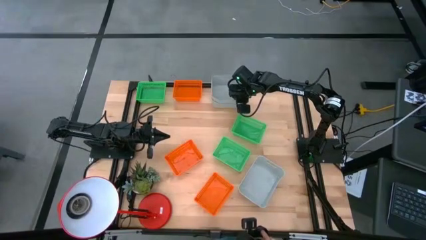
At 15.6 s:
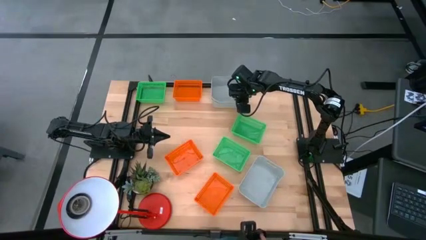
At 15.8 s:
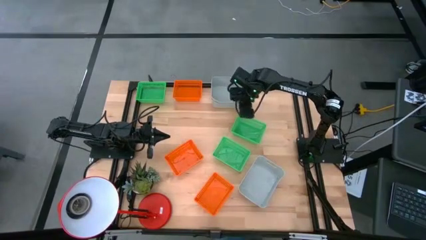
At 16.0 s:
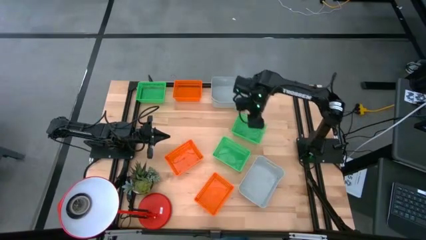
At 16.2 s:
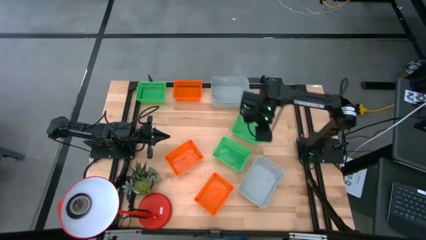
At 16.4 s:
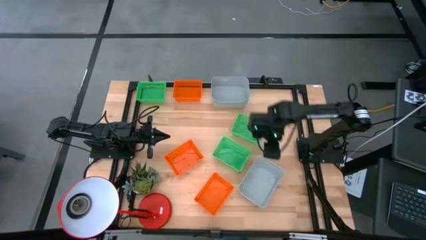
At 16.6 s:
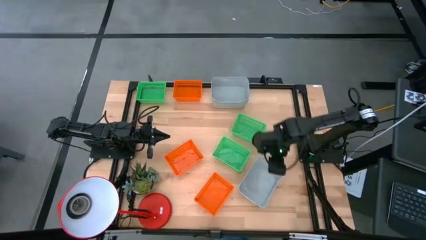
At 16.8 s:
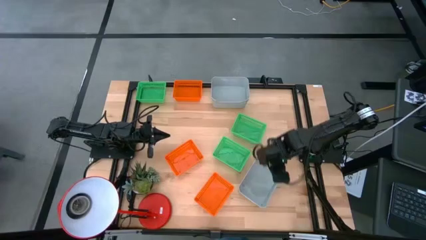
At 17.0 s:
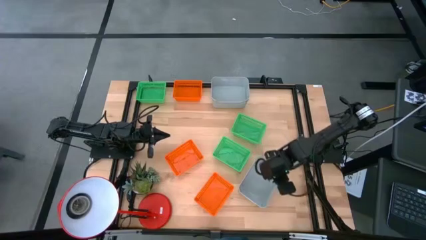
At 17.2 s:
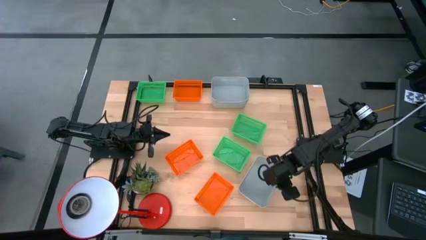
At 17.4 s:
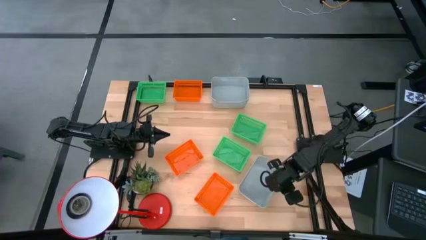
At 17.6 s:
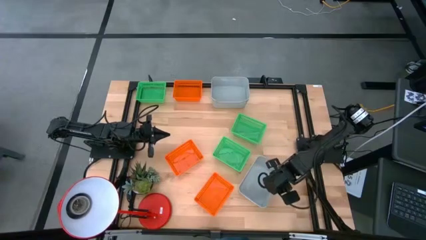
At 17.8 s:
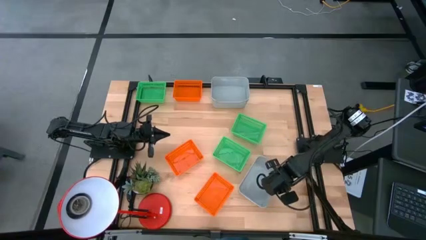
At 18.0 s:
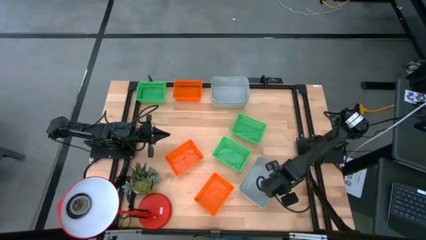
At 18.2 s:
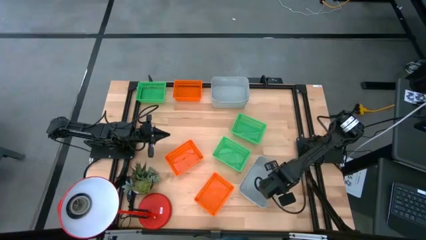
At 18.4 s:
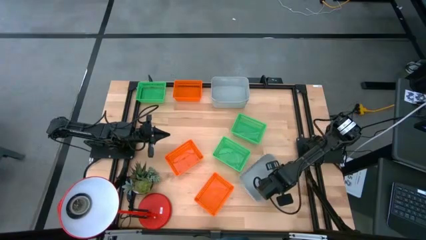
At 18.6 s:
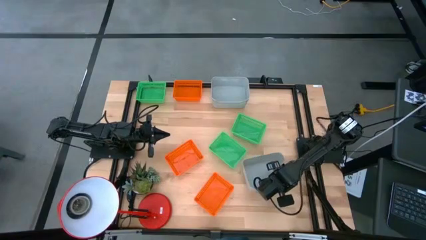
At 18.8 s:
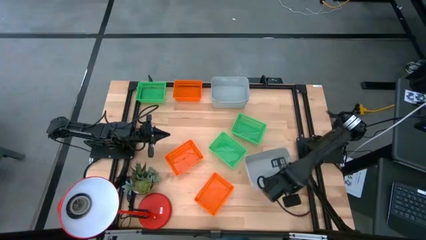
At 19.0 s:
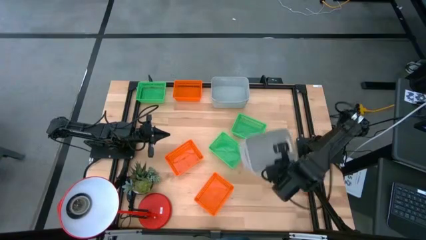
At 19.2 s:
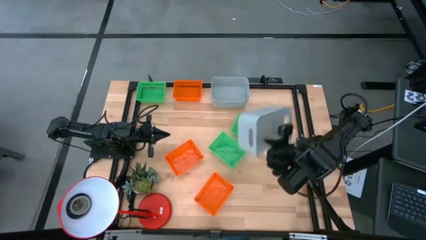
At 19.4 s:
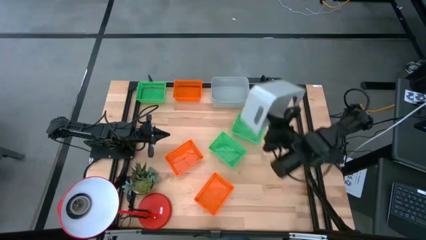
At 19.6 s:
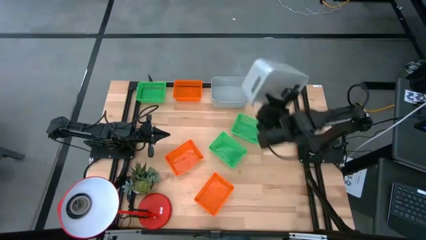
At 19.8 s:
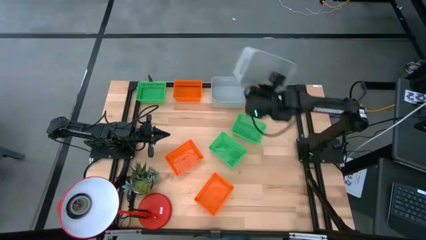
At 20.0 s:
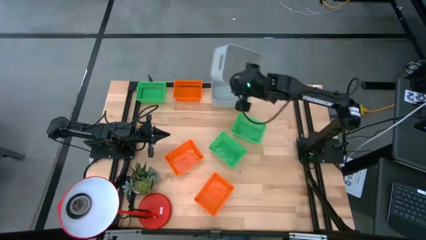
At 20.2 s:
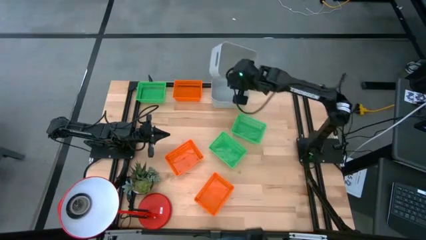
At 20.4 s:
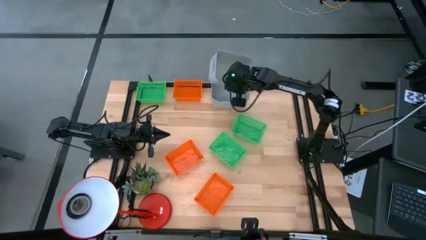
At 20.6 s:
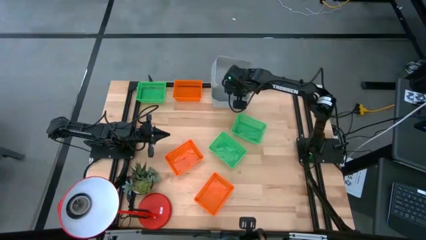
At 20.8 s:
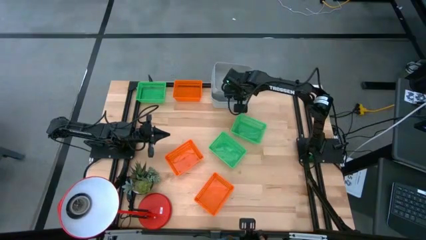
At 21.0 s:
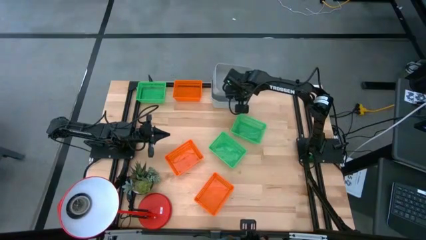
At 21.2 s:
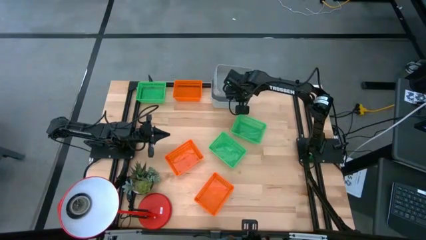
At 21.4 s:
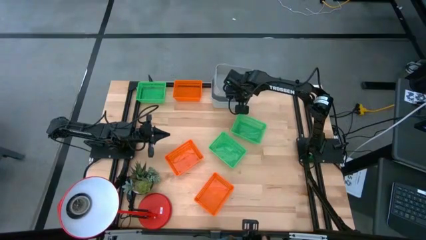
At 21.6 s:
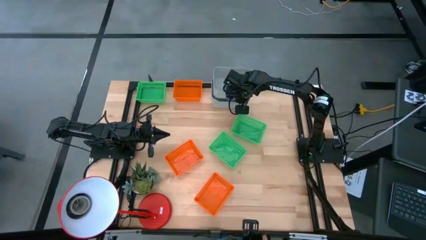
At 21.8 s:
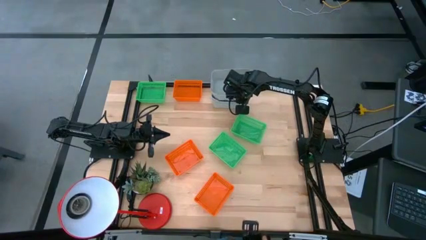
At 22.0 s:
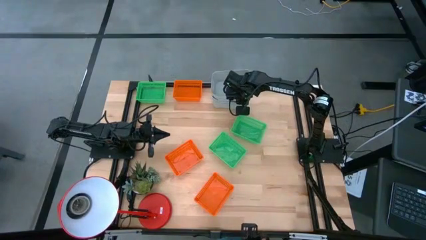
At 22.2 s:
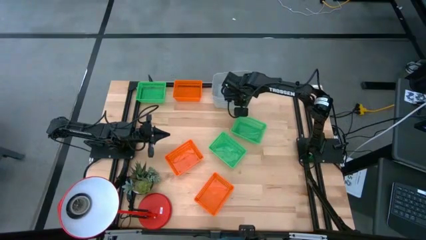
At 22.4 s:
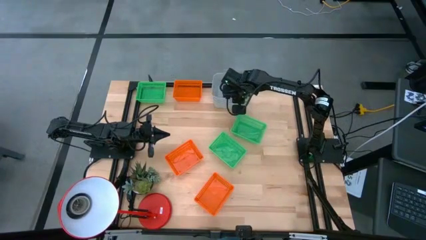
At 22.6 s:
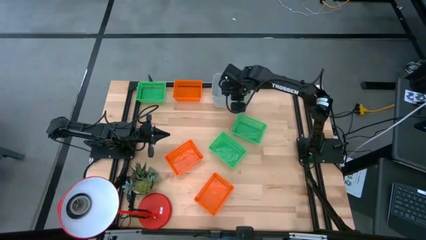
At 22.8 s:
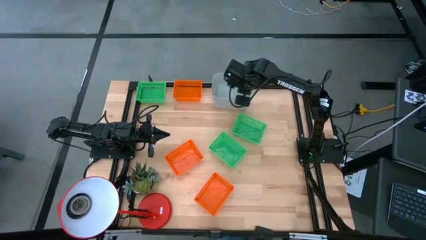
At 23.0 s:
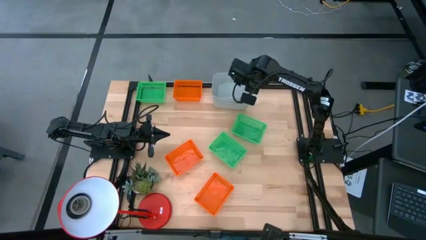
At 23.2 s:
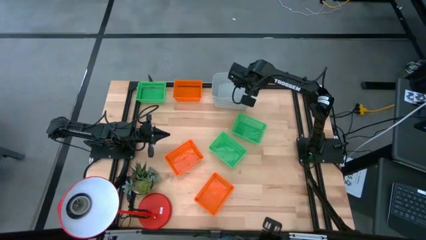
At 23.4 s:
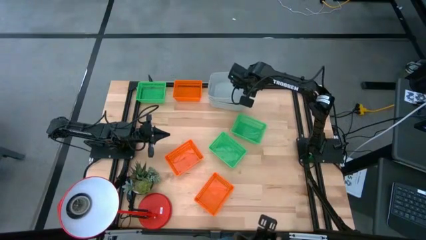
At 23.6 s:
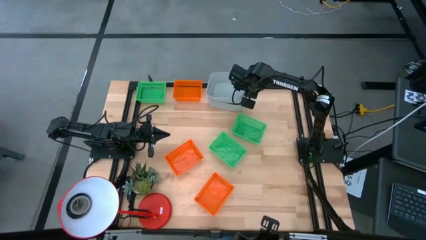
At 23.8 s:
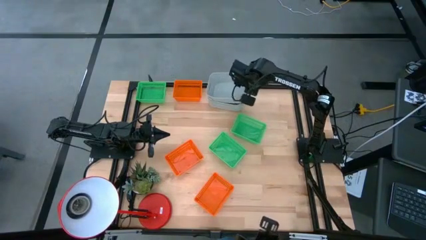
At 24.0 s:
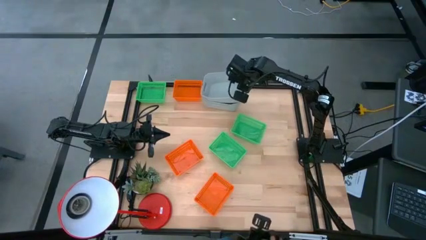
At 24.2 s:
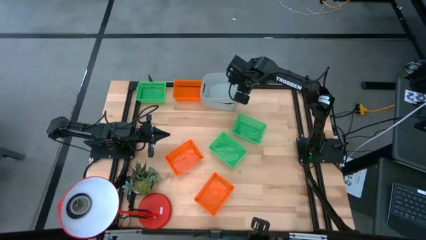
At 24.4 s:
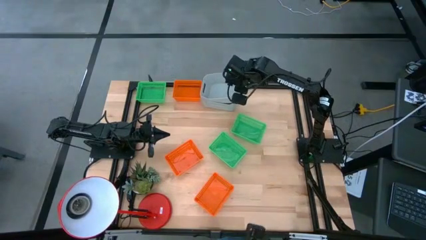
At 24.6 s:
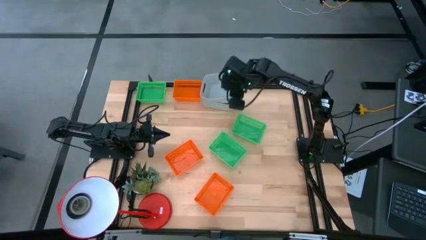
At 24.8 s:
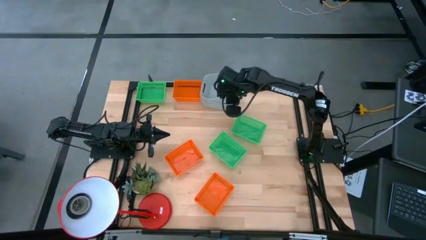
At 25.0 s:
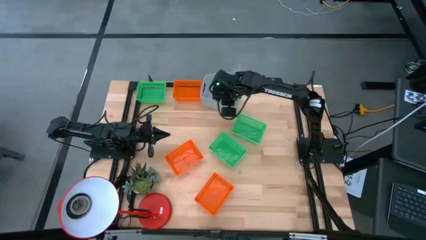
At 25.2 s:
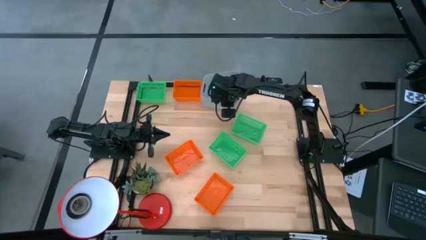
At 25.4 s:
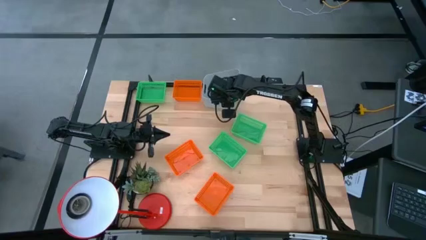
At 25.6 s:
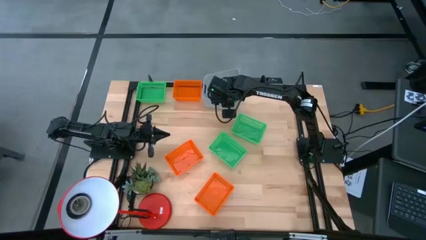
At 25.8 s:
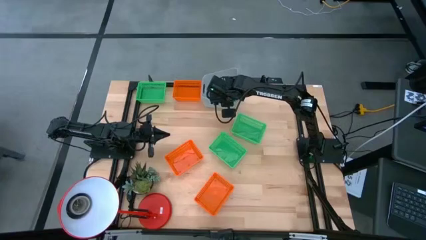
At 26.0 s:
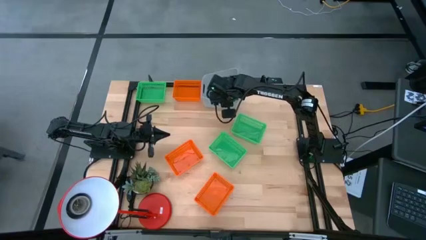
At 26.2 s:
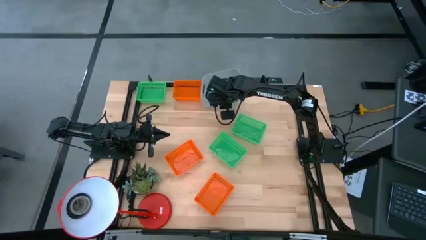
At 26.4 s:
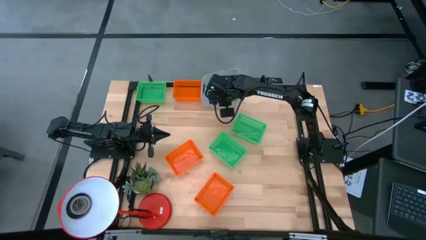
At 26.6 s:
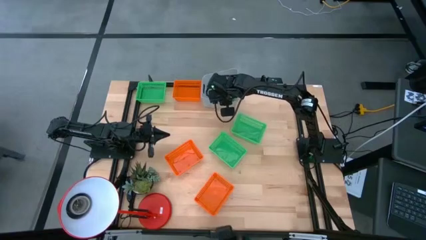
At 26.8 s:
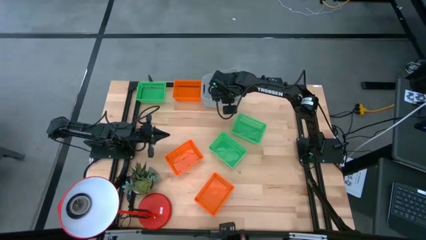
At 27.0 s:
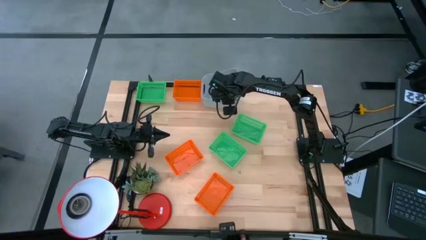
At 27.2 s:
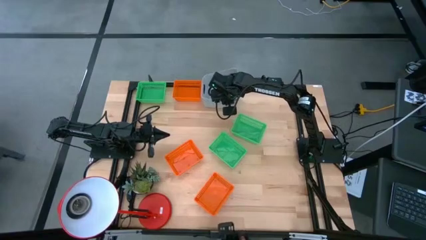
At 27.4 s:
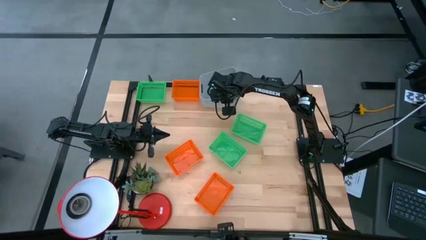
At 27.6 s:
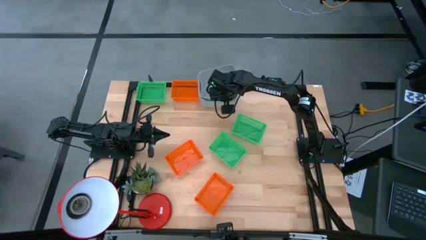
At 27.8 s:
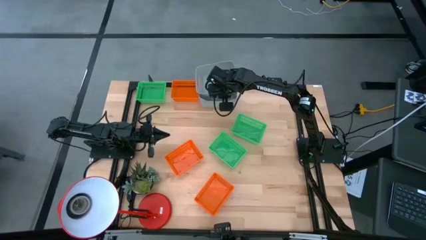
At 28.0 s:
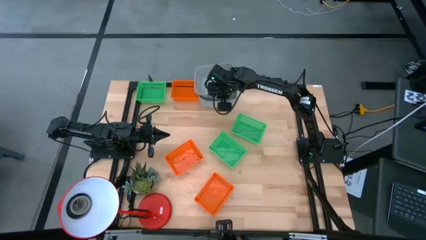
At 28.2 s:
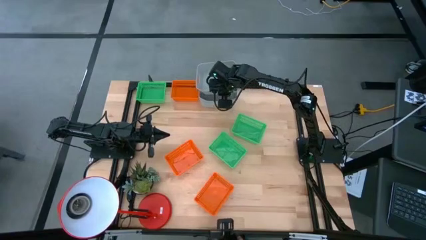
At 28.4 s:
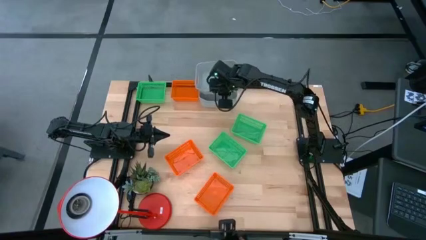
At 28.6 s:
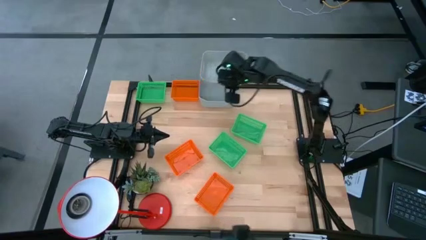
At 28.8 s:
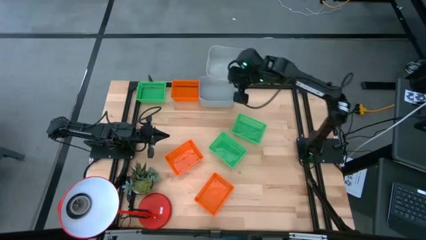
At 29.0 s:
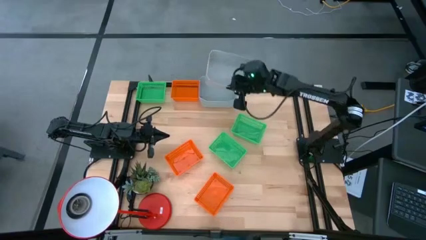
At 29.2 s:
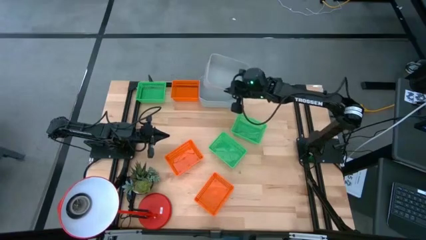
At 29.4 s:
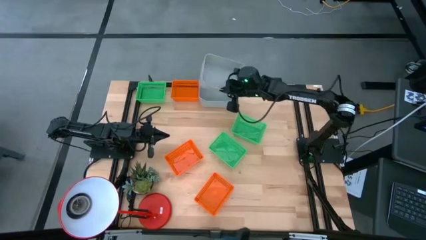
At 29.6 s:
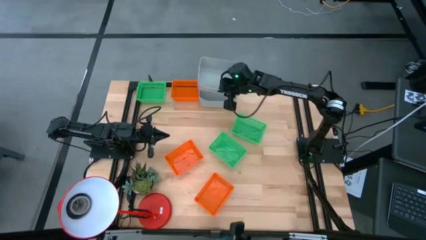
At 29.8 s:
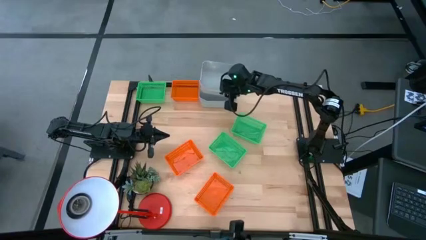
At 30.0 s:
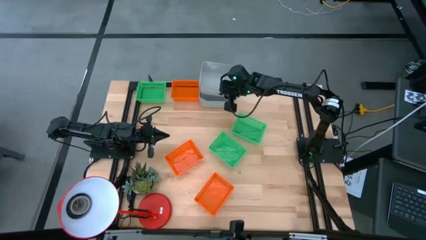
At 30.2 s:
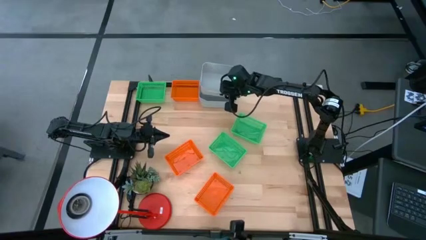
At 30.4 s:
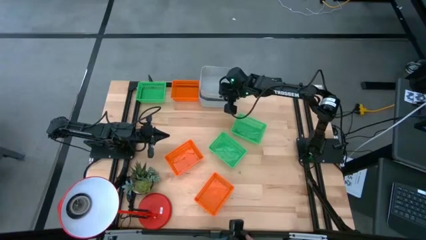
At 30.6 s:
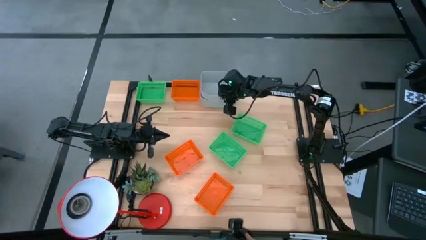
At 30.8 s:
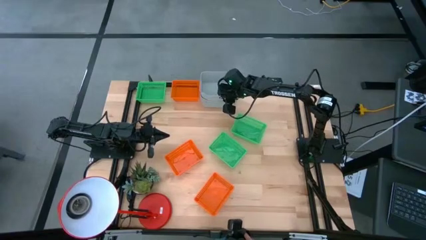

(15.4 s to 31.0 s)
Stack the bottom gray bin on the top gray bins
